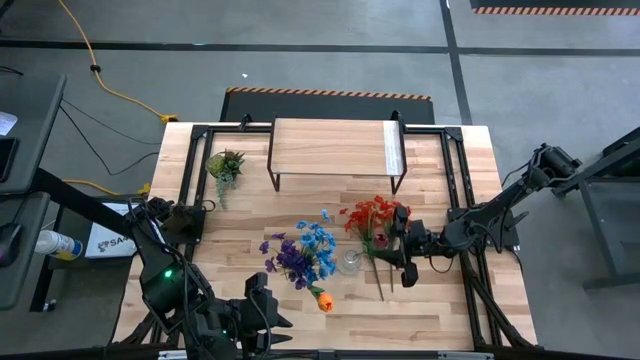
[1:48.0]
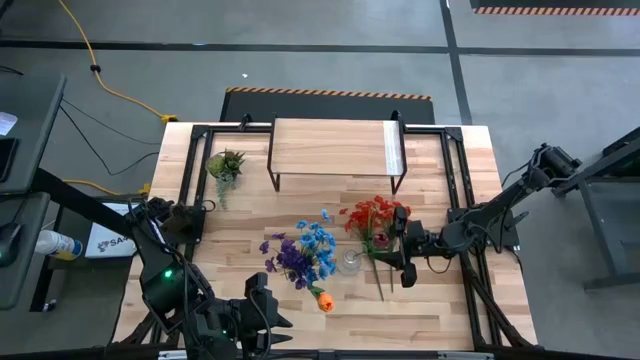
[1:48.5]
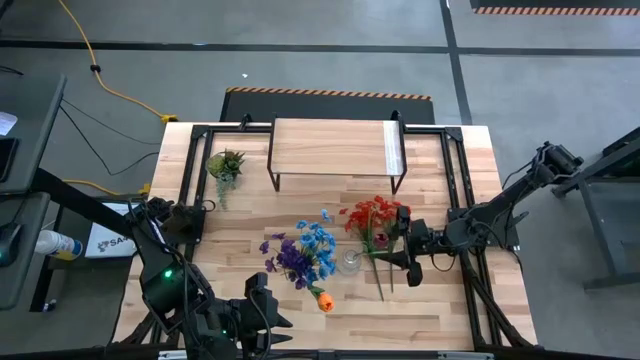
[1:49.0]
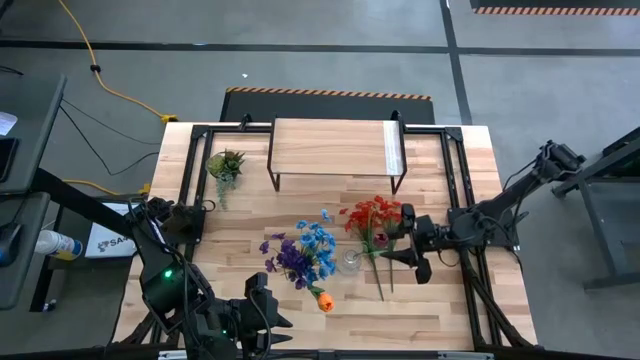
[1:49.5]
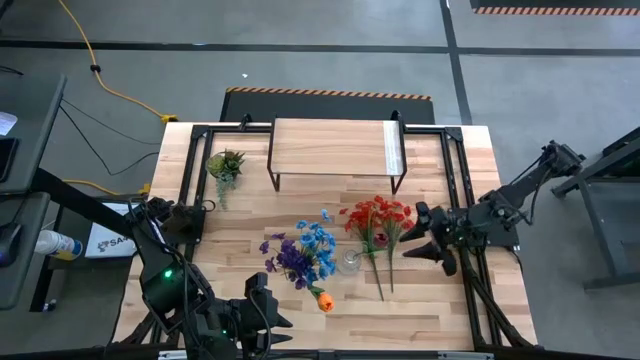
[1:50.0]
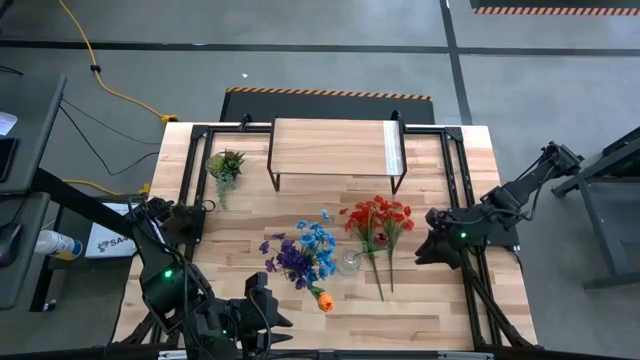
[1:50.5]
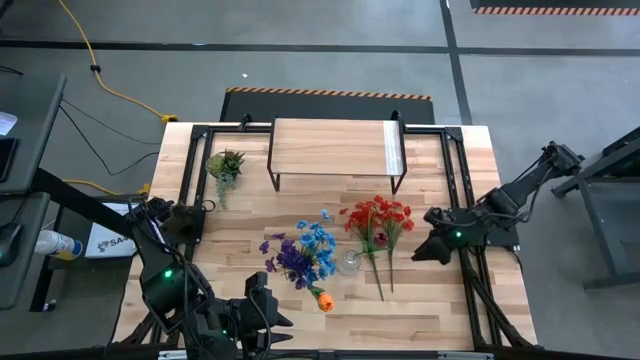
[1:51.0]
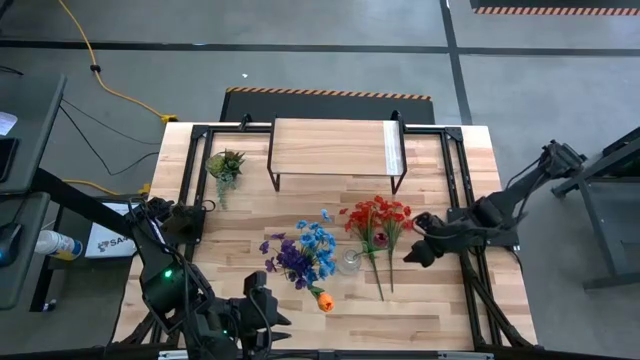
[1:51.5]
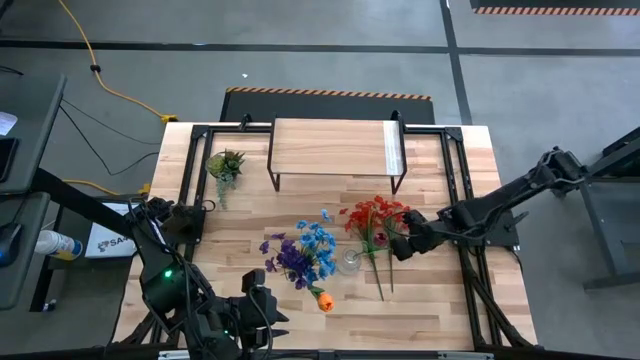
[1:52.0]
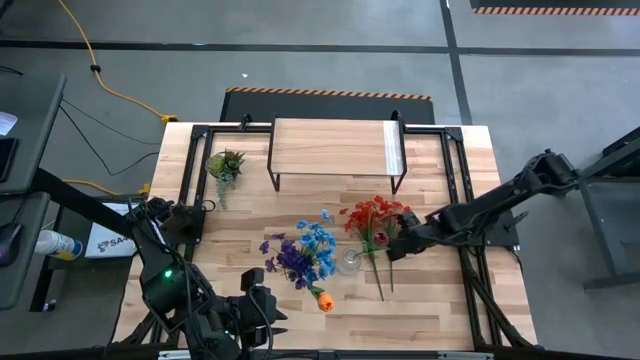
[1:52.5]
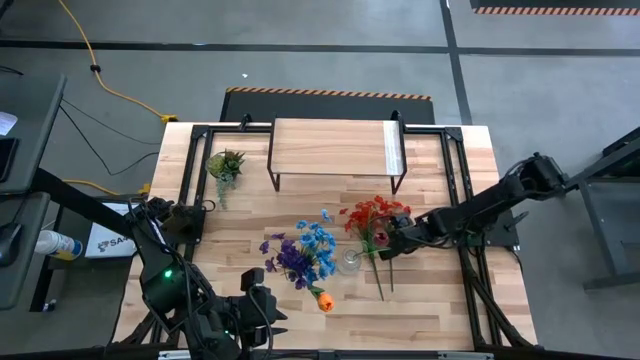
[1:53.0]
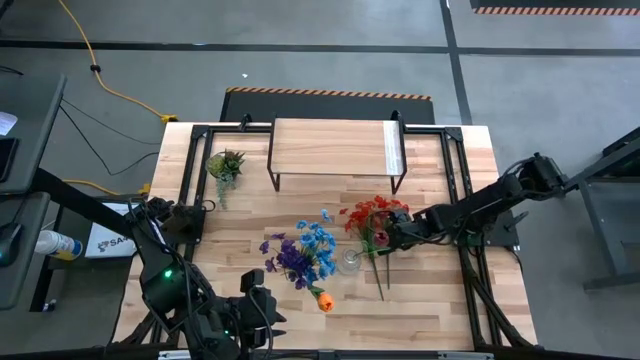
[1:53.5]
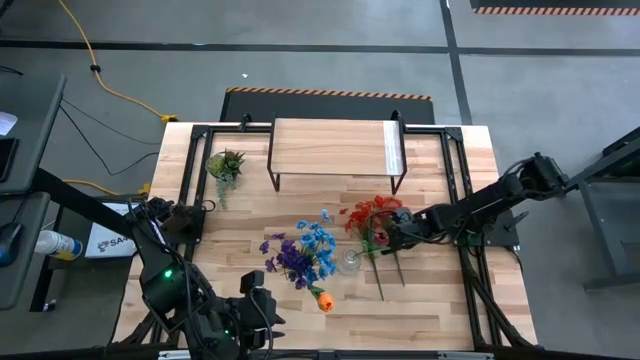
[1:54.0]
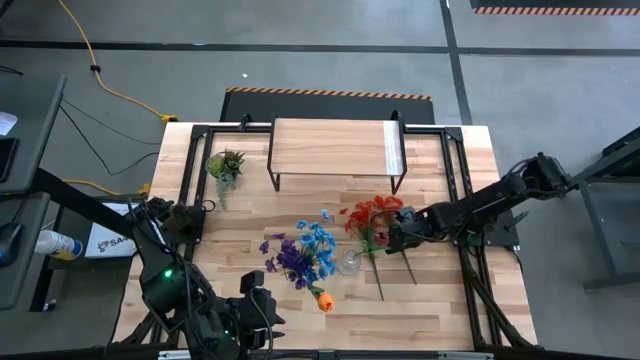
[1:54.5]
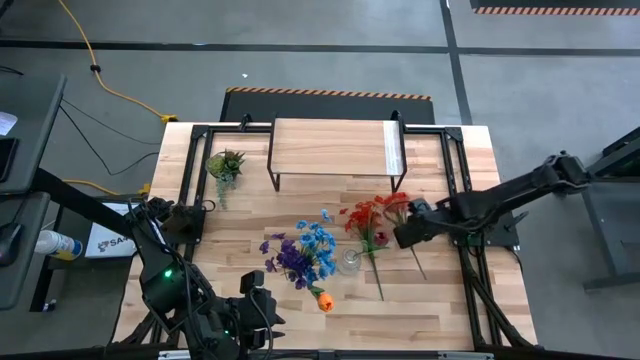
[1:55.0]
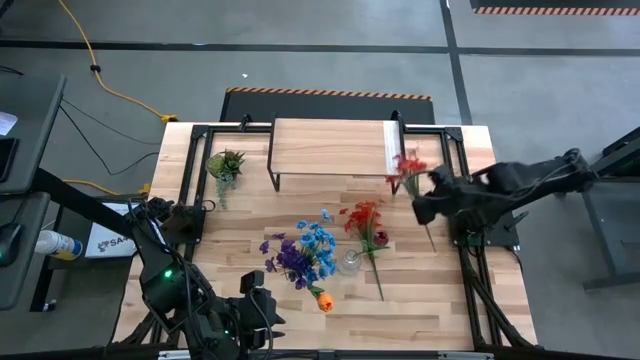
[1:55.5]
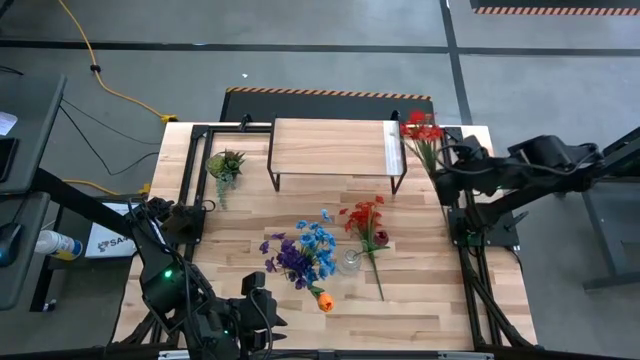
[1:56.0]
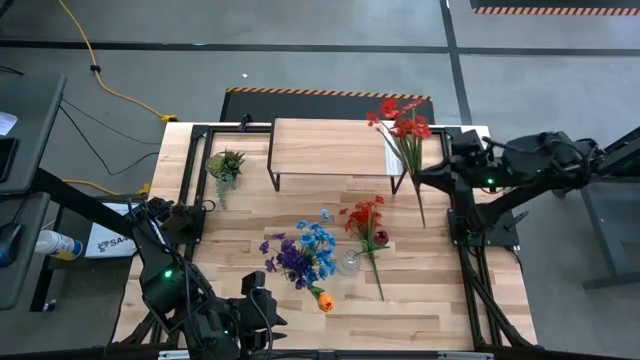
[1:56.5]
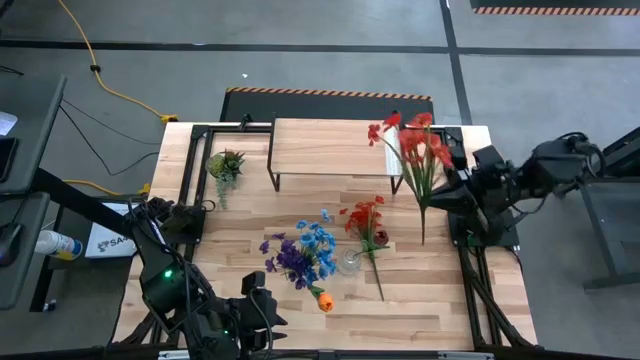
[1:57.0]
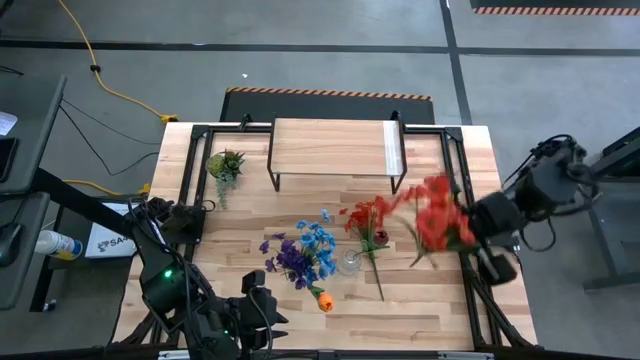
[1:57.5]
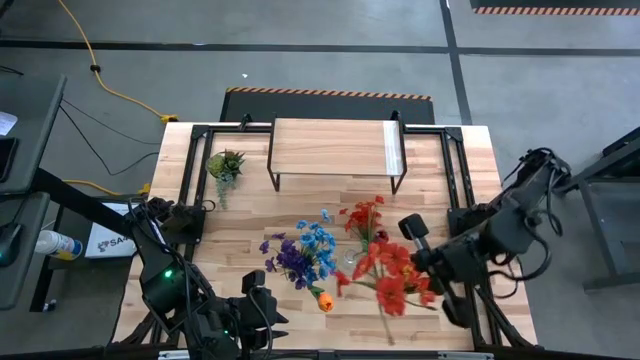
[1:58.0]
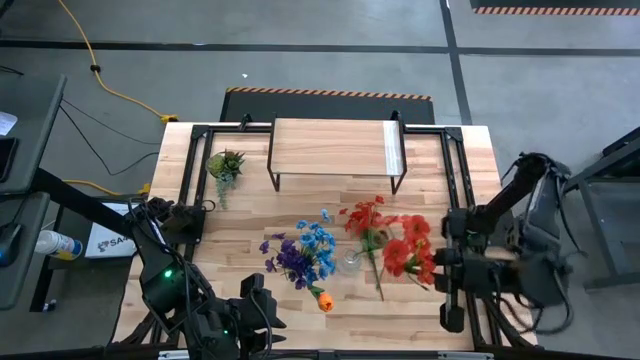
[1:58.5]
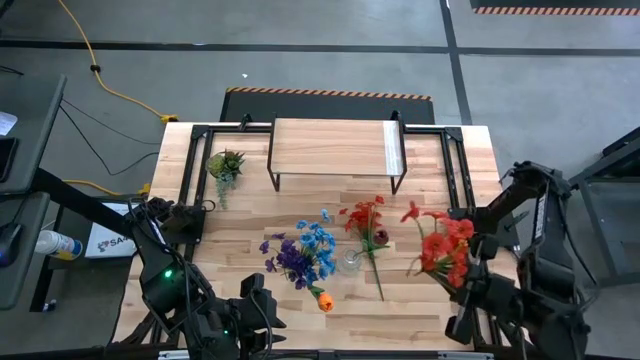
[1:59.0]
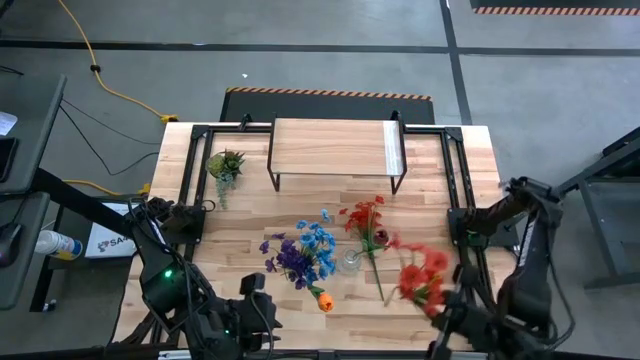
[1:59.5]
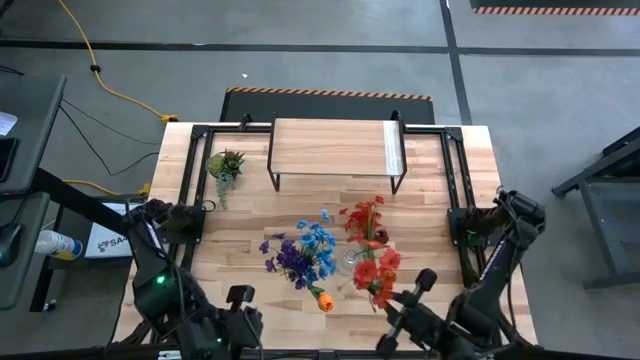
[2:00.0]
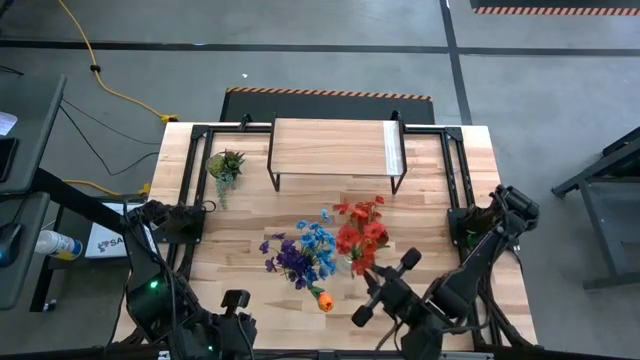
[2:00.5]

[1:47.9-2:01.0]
Task: Pick and place flowers into a vace then onto a shelf
Put the orange flowers into the right transparent flower vase

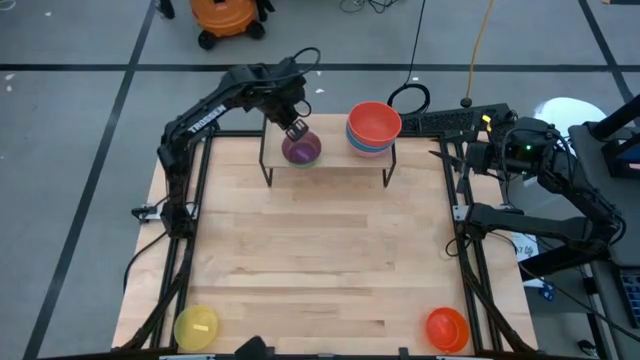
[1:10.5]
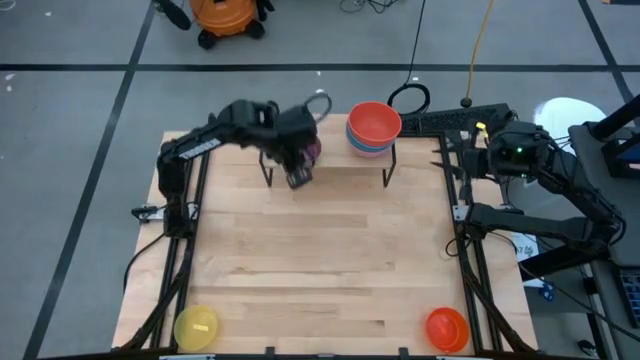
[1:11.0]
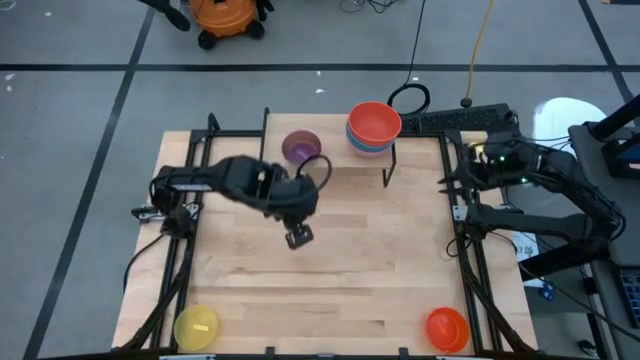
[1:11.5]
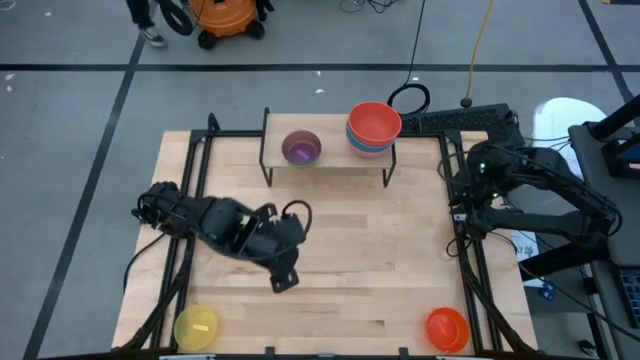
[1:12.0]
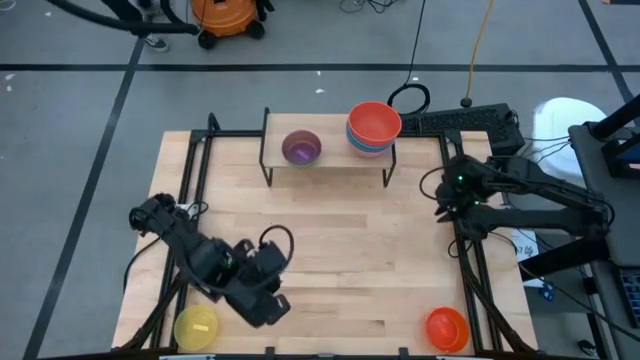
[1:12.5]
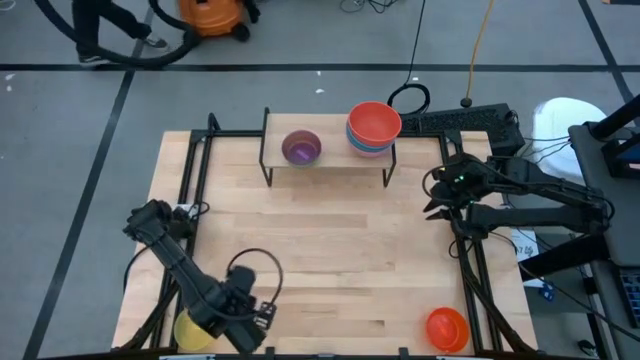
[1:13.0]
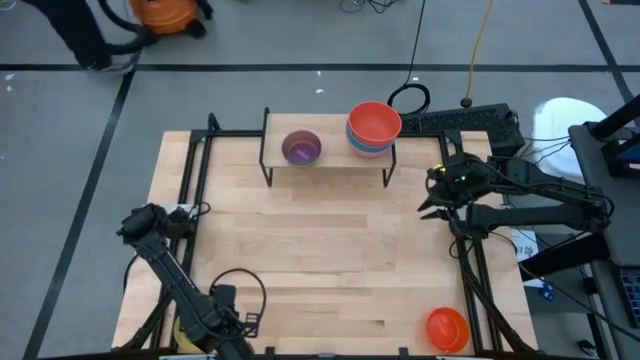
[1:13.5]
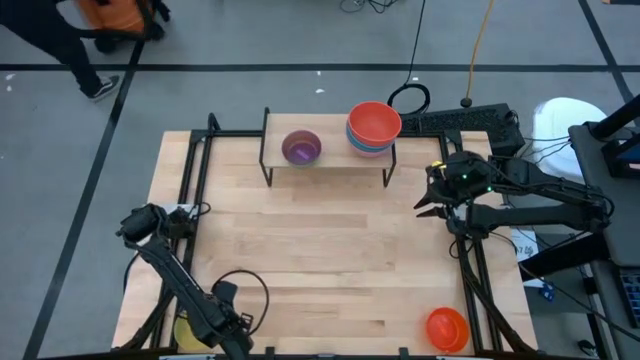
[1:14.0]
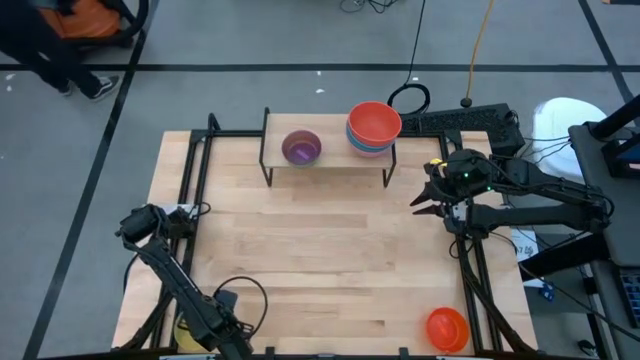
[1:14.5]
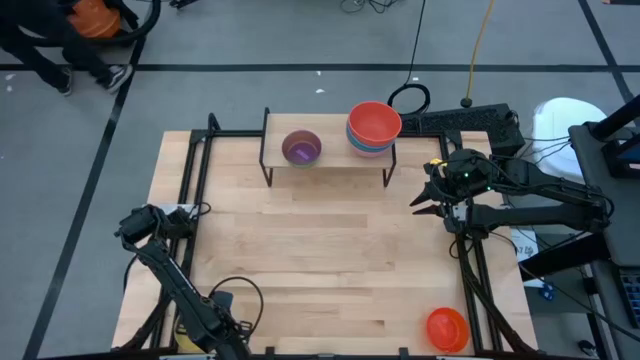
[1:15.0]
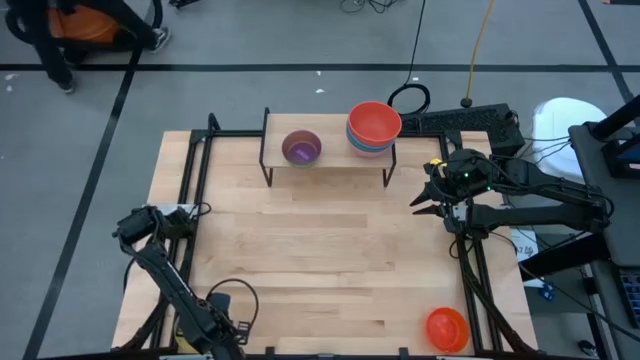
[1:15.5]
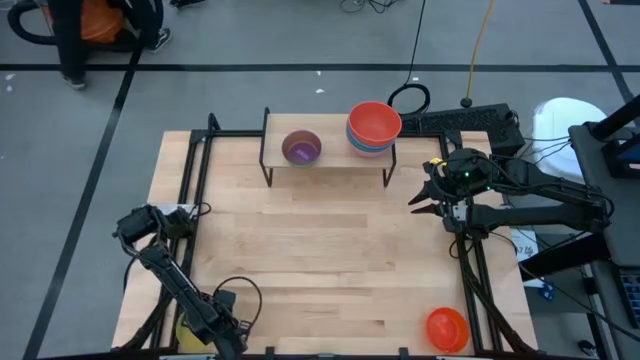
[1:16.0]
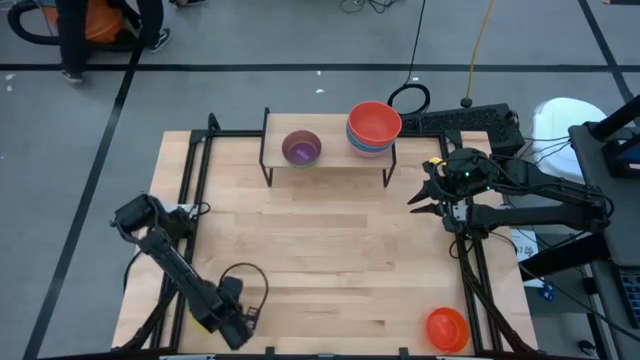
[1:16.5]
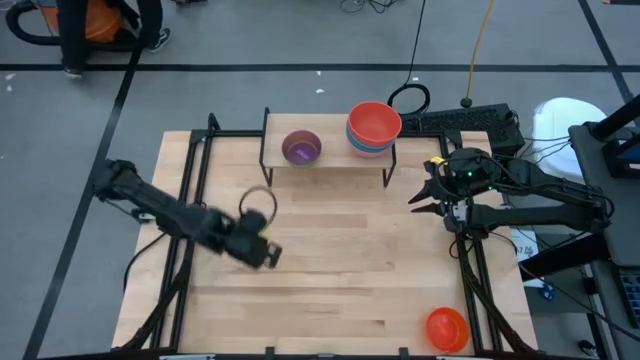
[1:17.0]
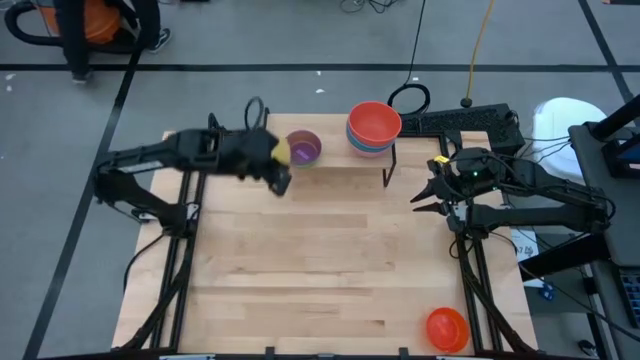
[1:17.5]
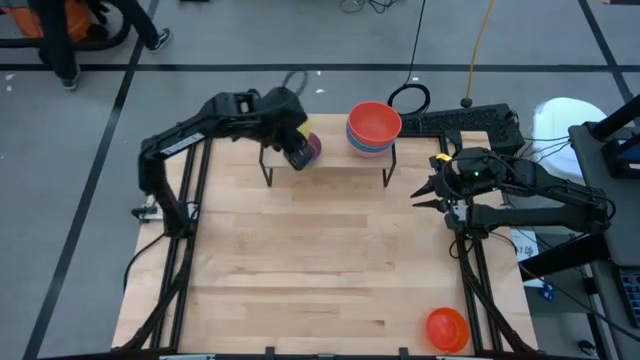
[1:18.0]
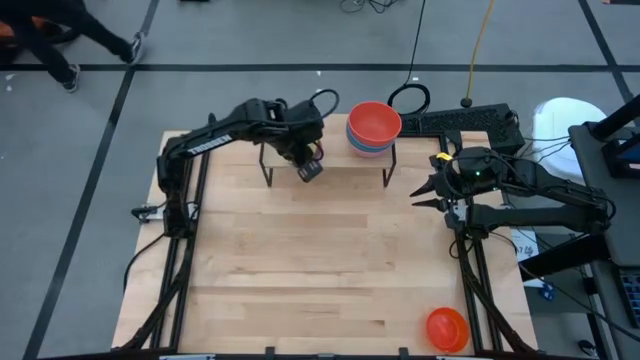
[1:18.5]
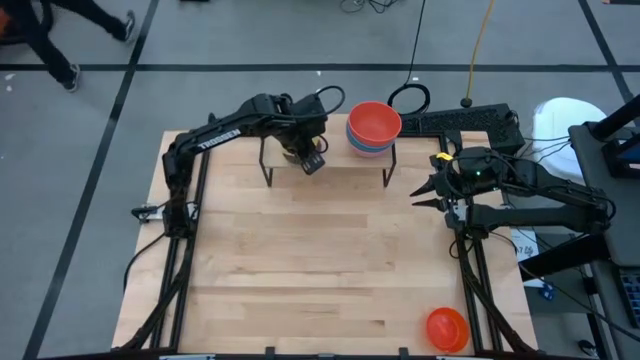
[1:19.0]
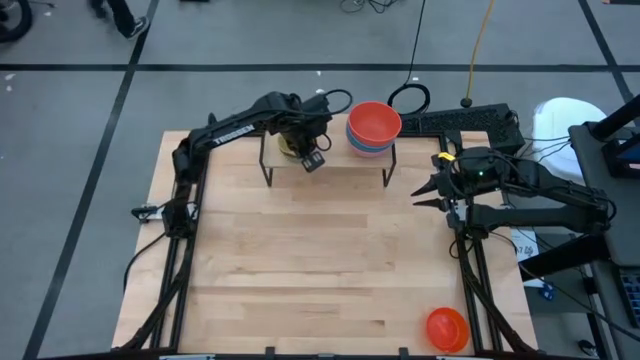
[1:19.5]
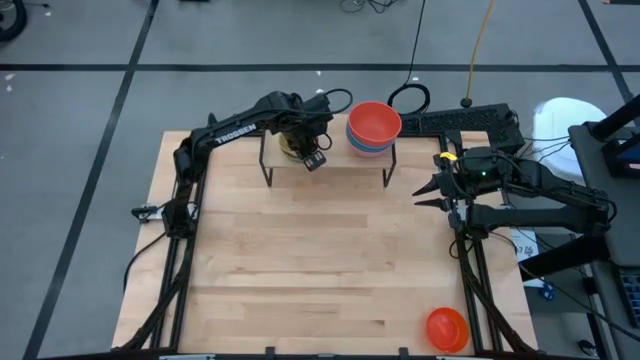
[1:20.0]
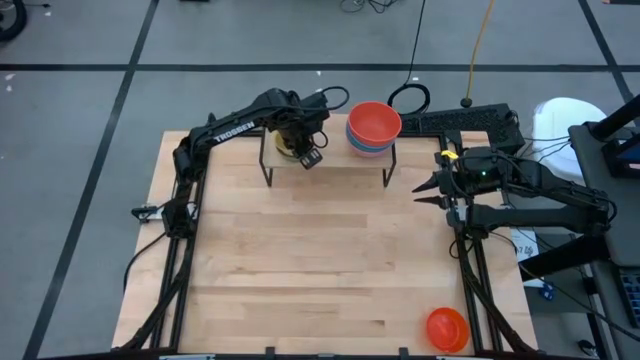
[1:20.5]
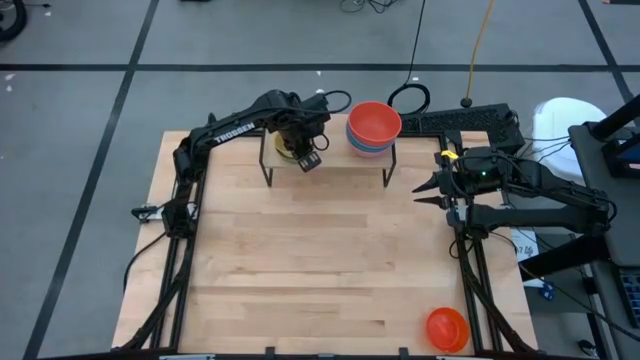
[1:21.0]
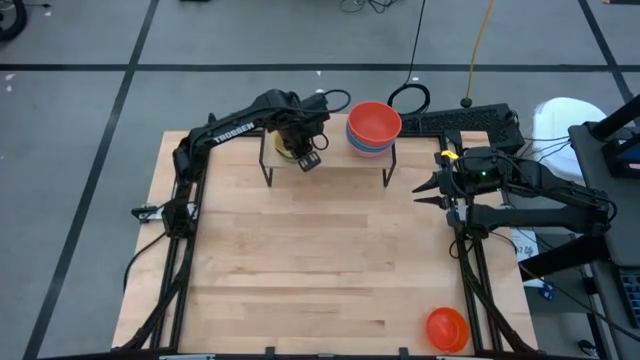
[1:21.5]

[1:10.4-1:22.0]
Task: Place and stack bowls onto a shelf
Stack the light yellow bowl on top of the light purple bowl on the shelf
